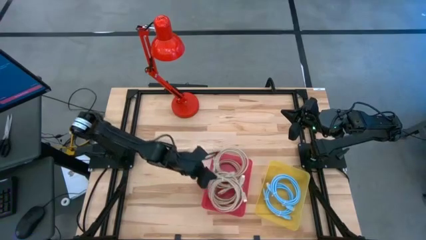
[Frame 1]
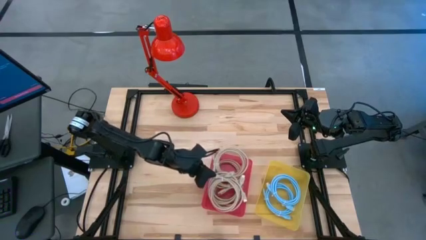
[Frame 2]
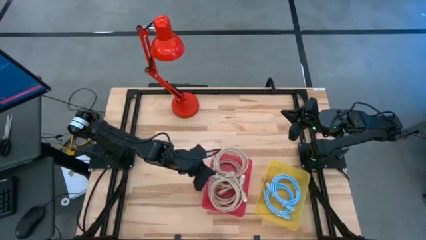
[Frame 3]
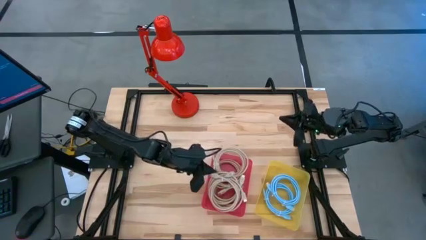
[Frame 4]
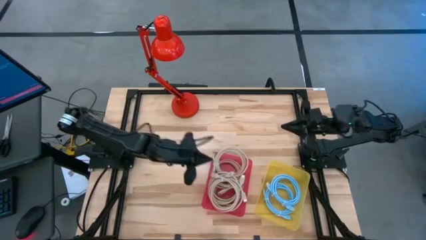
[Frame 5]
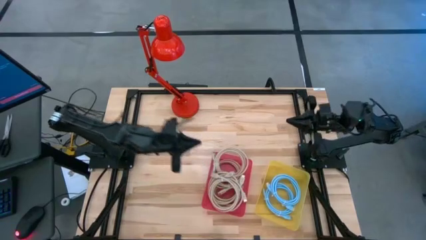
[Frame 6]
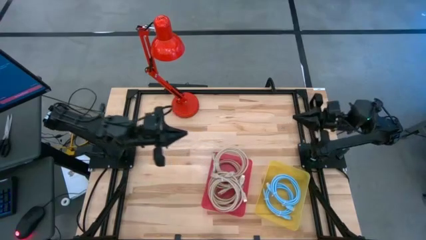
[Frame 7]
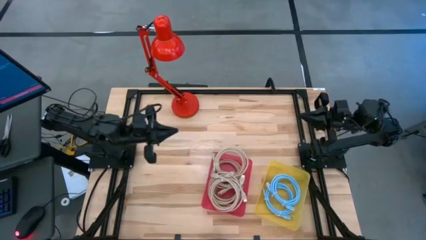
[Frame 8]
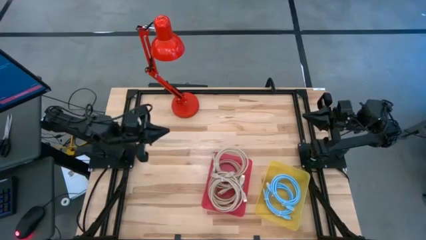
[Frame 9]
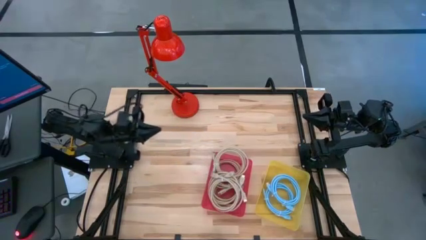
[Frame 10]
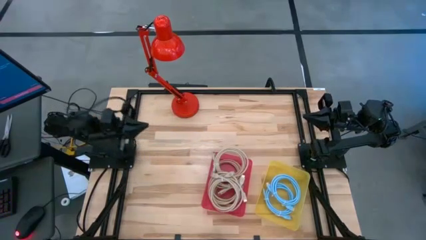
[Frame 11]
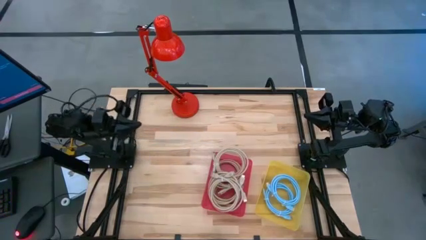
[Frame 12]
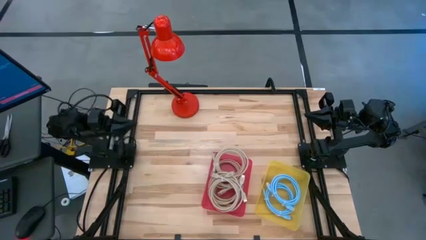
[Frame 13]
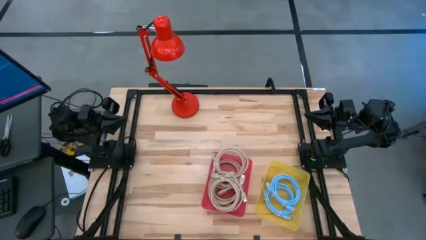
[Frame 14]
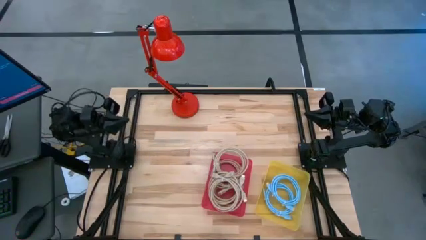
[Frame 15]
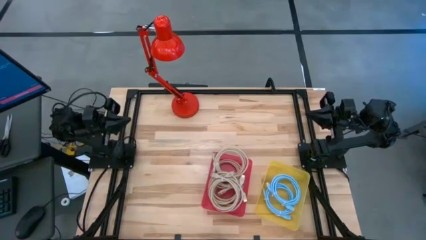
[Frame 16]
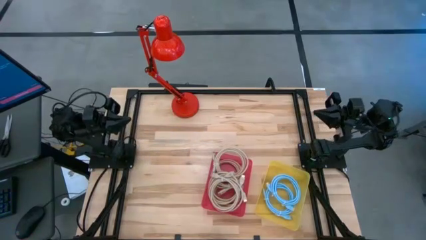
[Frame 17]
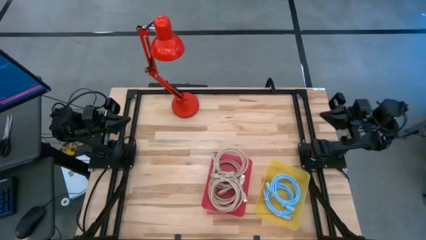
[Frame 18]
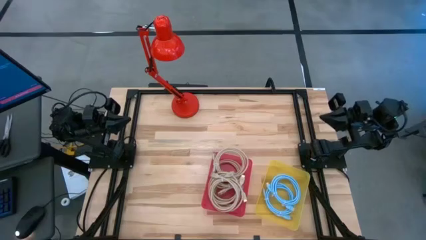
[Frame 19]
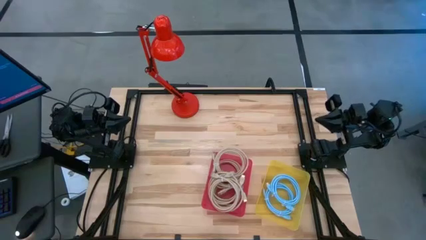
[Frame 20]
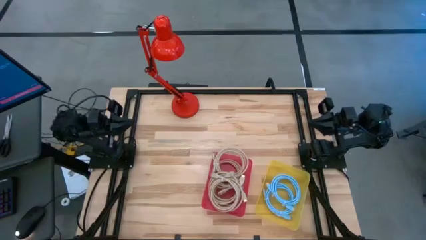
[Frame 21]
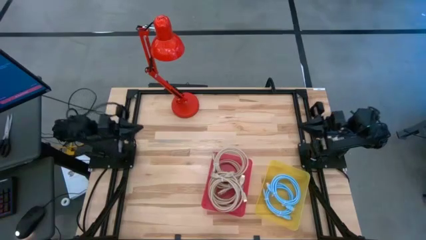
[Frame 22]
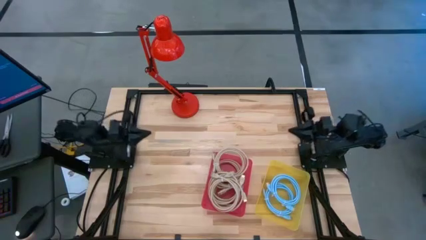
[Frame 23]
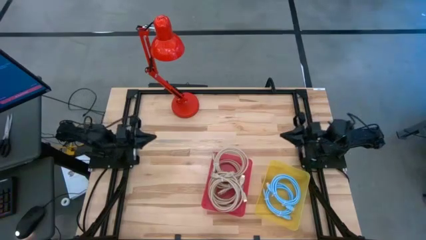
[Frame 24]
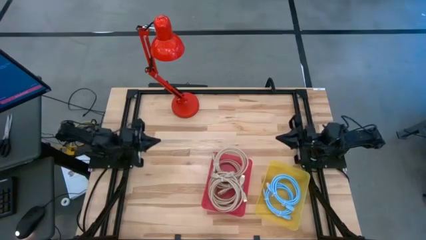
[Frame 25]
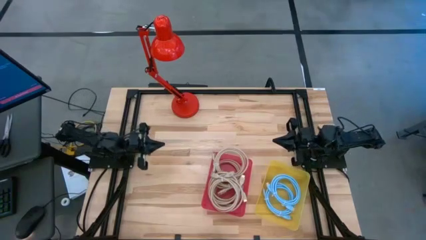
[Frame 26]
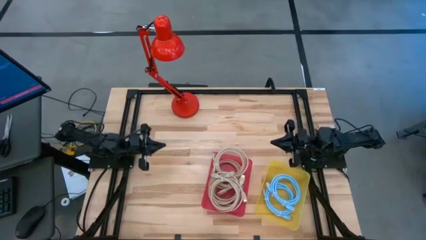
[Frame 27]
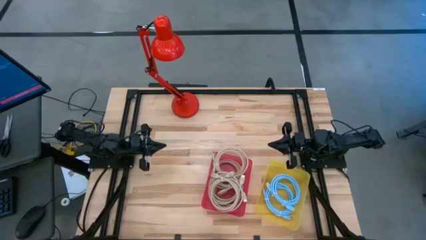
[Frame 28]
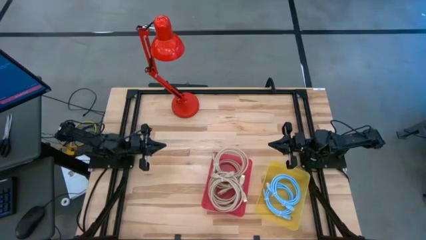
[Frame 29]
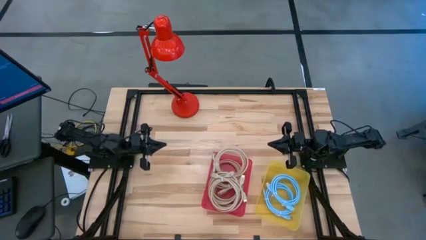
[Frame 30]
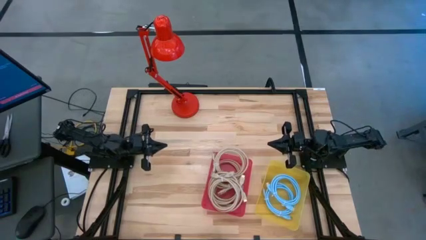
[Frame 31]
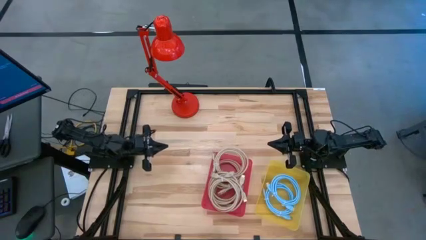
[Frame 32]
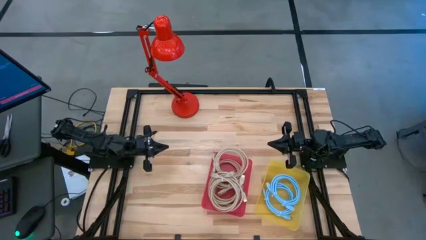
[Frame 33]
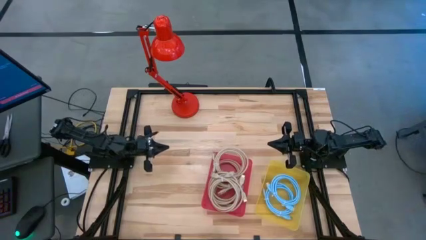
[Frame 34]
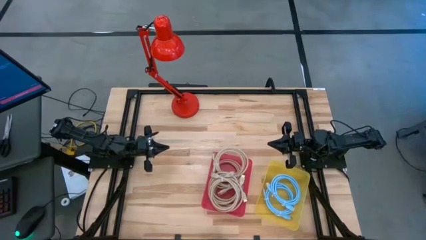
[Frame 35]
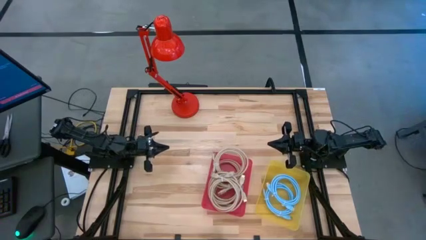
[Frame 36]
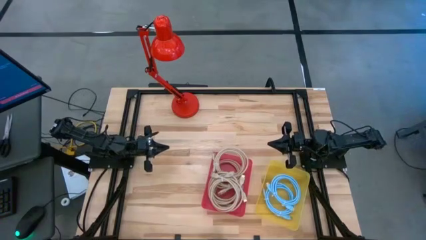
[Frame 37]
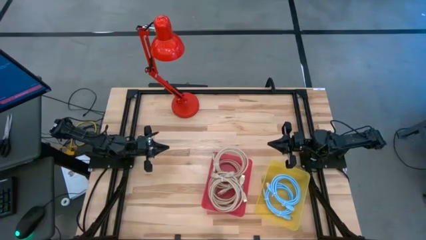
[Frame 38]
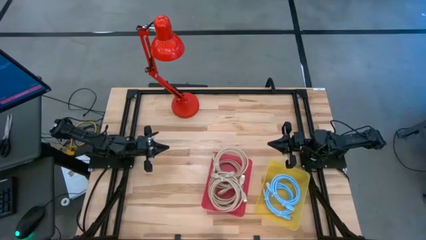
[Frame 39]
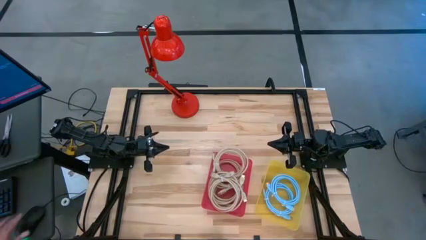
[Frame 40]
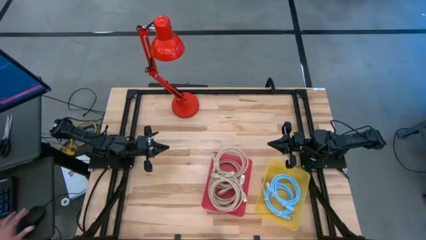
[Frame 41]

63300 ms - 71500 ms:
Task: Sort HDMI cables
Return to Home Position

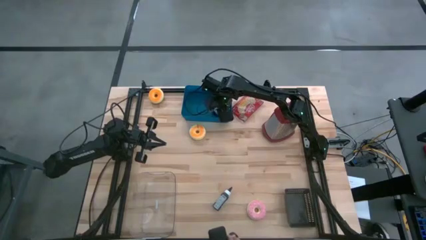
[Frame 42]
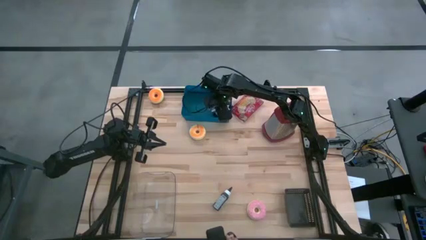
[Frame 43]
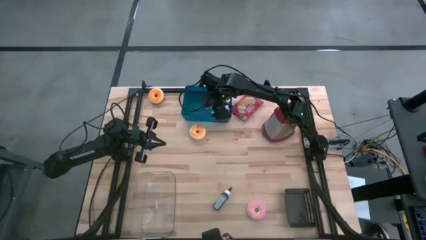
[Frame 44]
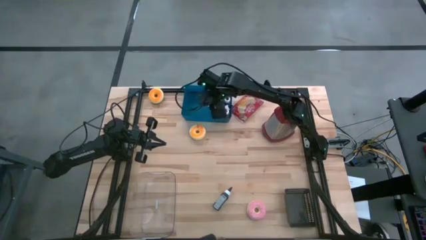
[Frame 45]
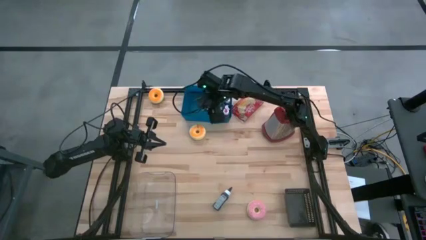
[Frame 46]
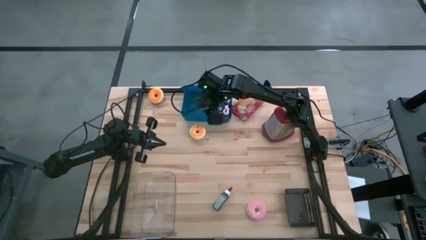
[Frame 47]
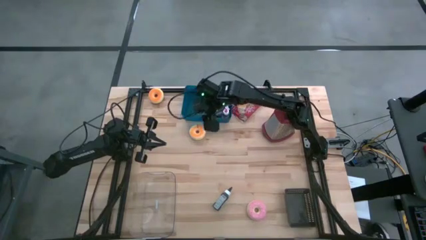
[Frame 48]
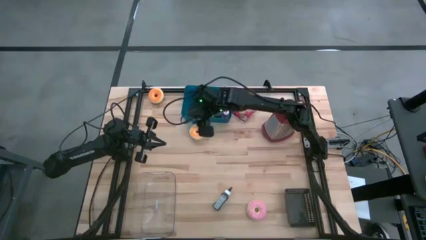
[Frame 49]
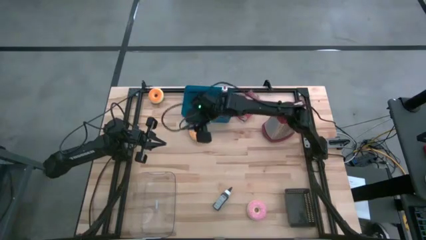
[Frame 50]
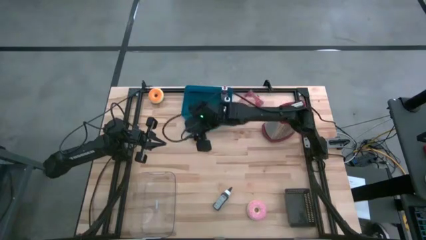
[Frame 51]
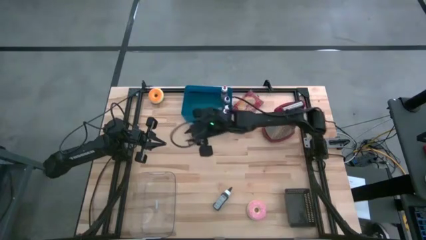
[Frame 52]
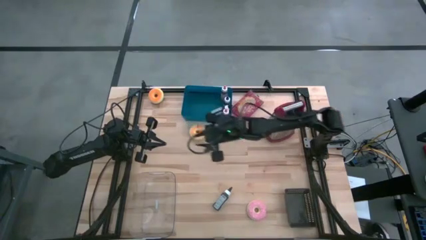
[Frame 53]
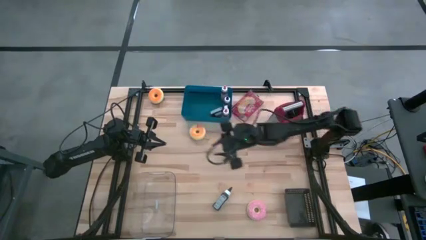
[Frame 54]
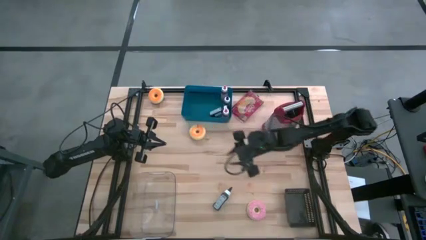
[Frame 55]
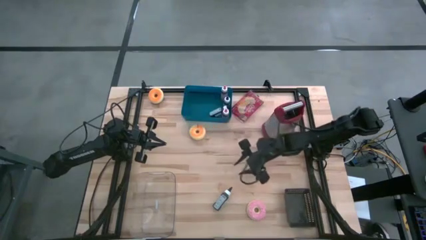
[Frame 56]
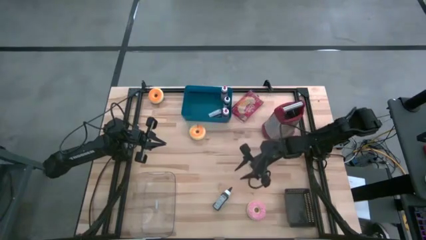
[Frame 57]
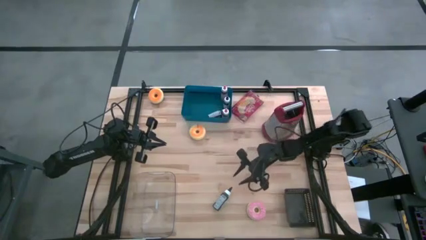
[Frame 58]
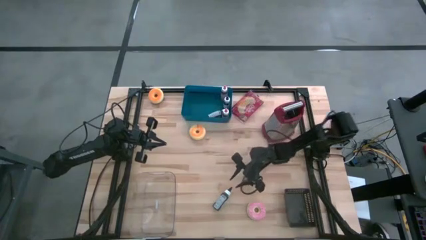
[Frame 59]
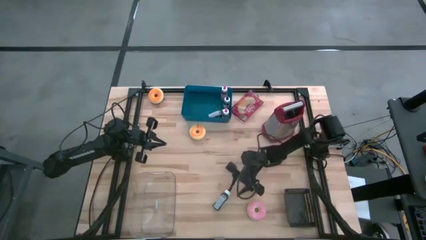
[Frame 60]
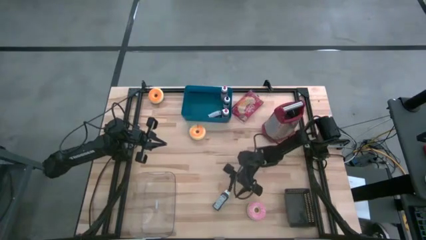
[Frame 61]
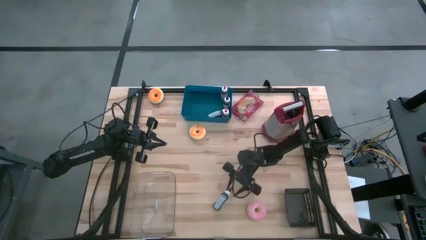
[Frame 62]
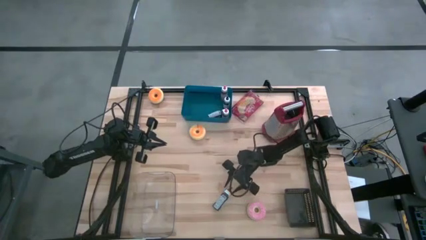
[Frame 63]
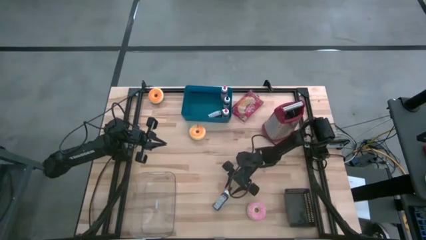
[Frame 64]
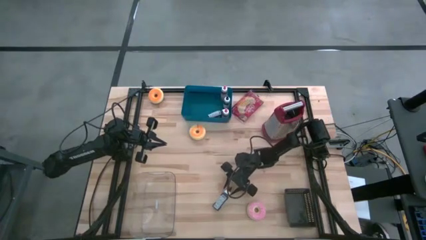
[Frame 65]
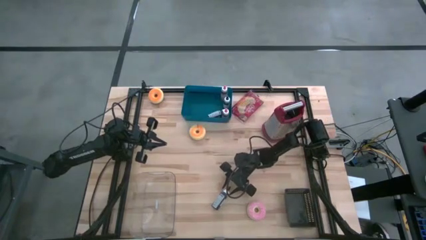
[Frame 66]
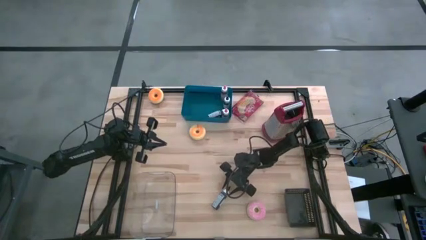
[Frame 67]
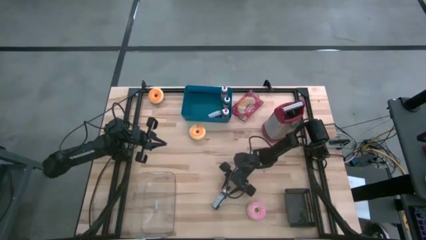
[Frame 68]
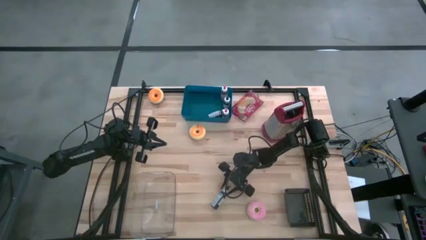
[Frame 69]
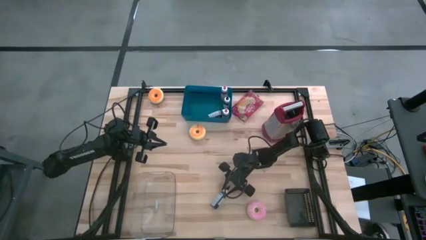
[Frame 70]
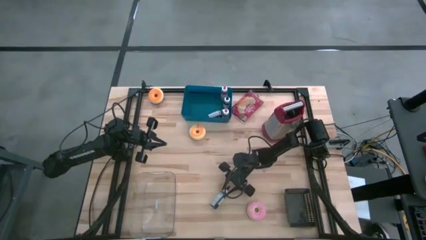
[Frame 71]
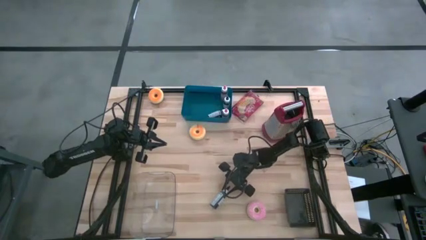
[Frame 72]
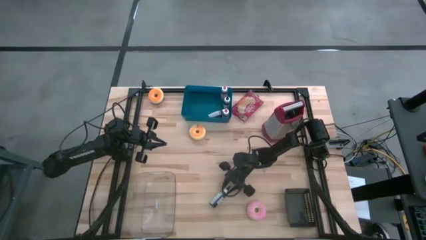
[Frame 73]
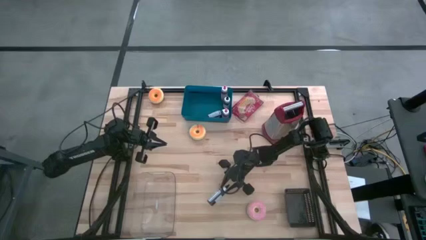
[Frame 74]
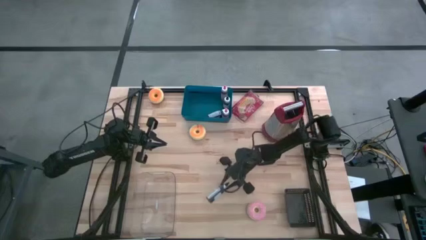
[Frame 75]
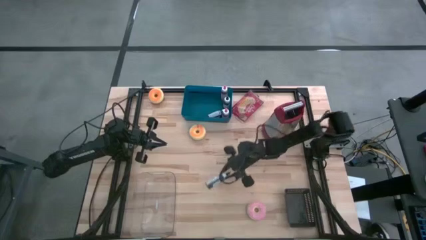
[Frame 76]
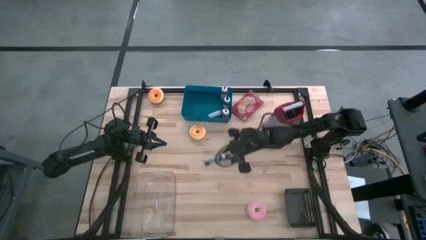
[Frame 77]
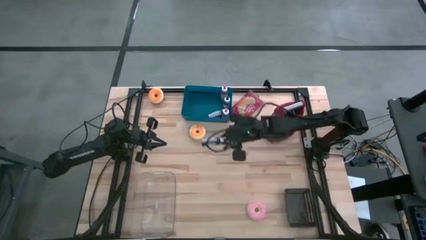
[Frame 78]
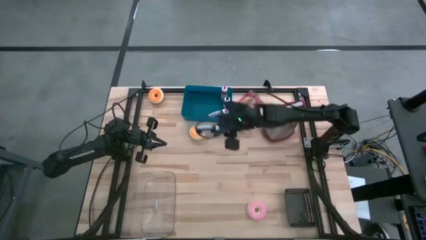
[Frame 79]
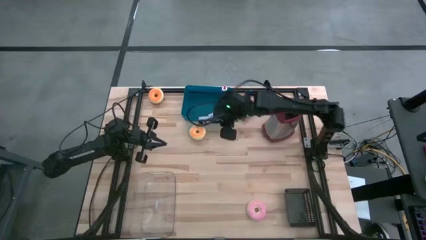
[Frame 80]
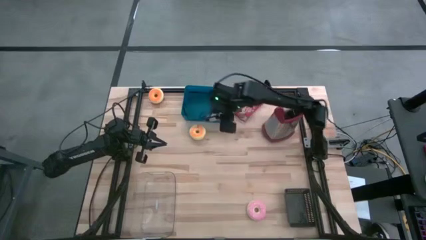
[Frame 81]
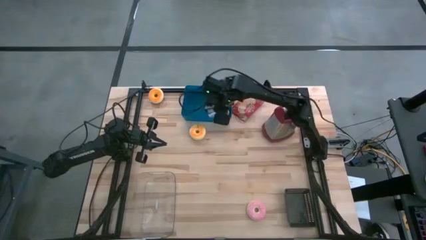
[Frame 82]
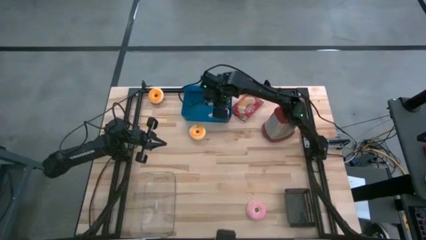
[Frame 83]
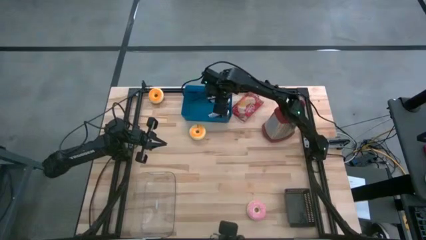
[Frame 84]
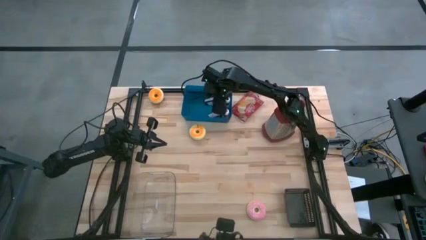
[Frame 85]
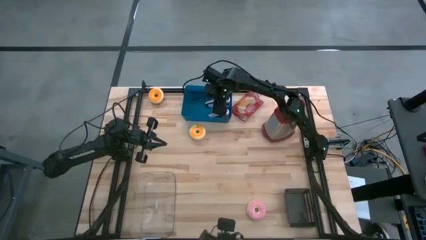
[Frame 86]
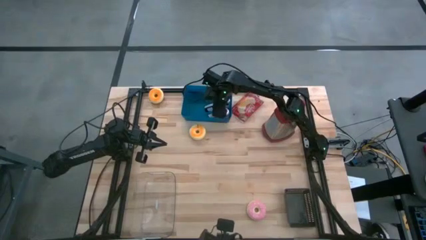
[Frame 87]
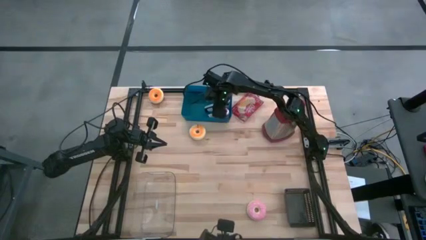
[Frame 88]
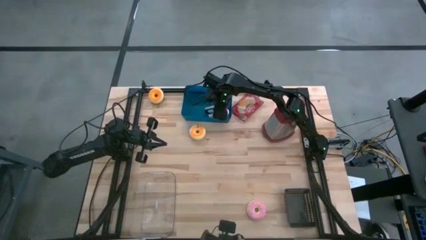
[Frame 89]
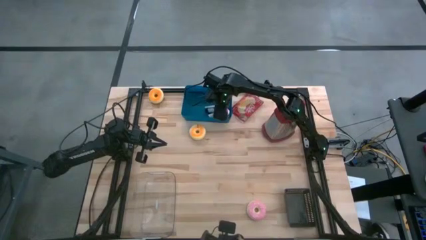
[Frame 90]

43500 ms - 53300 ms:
Task: Pick & Place Food Item
Put the black food coloring into the blue bin
